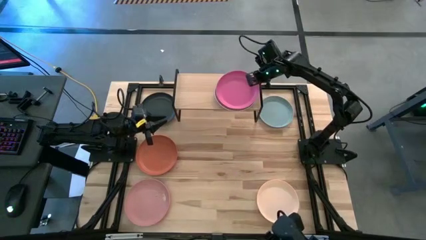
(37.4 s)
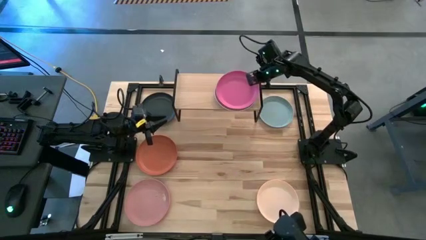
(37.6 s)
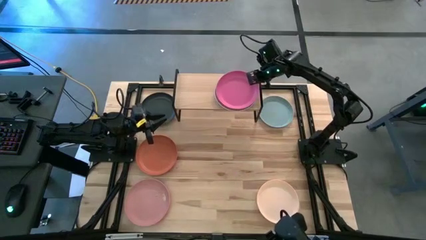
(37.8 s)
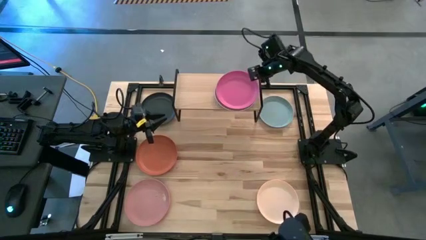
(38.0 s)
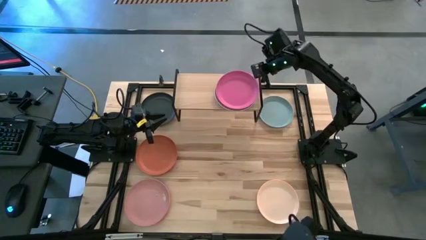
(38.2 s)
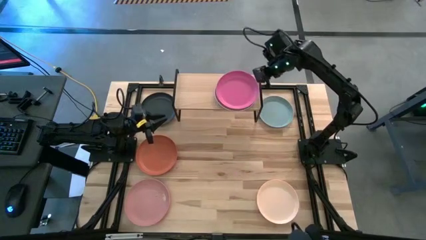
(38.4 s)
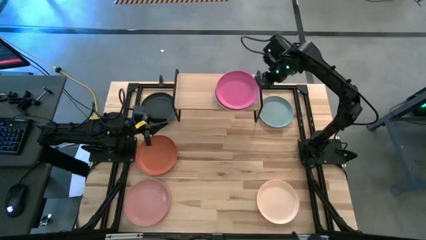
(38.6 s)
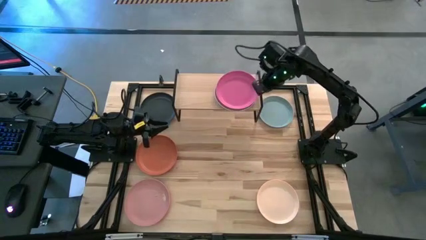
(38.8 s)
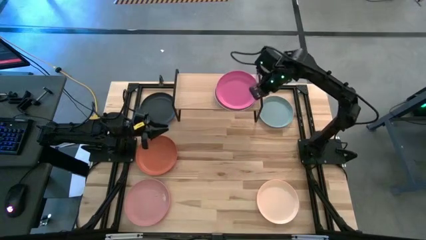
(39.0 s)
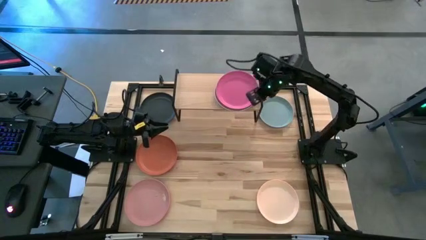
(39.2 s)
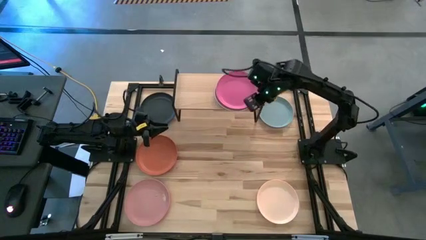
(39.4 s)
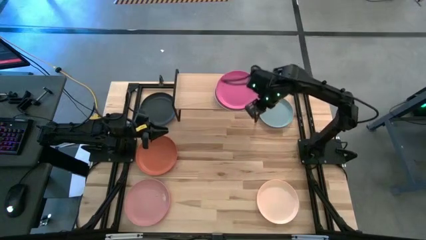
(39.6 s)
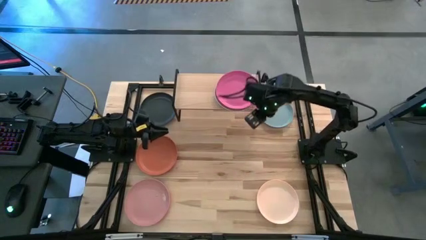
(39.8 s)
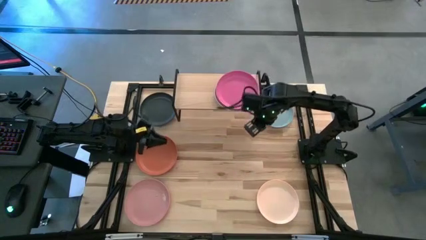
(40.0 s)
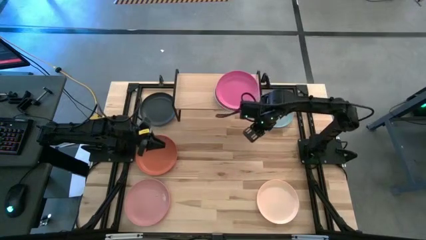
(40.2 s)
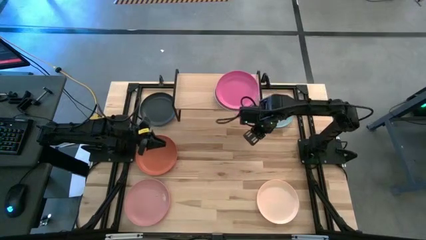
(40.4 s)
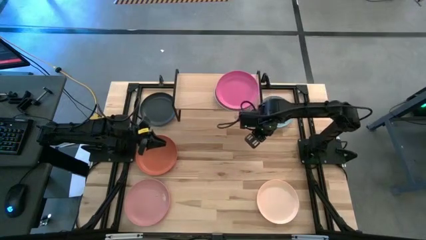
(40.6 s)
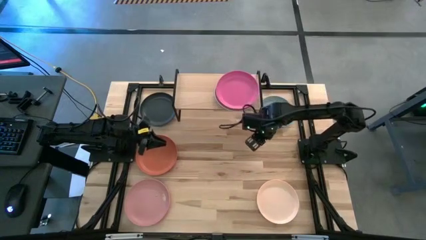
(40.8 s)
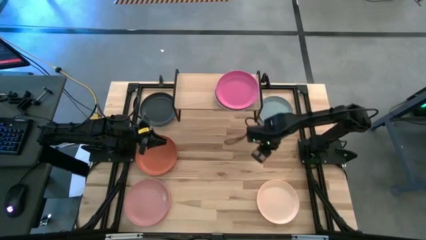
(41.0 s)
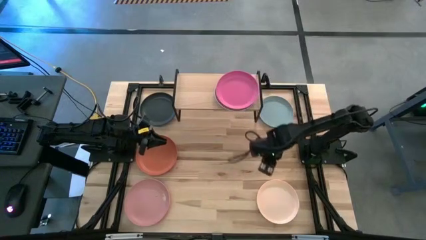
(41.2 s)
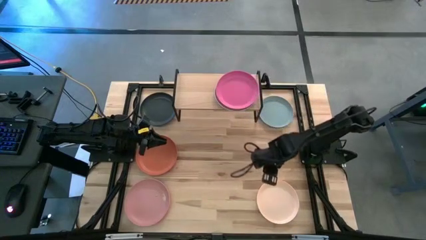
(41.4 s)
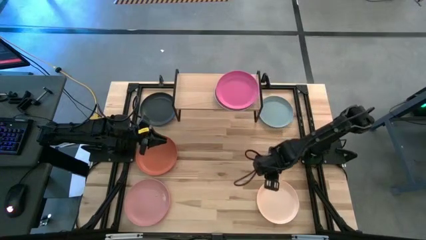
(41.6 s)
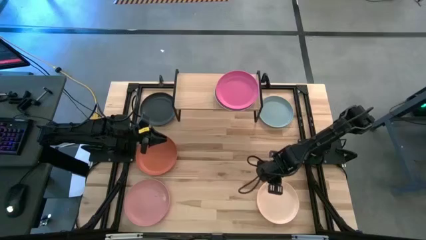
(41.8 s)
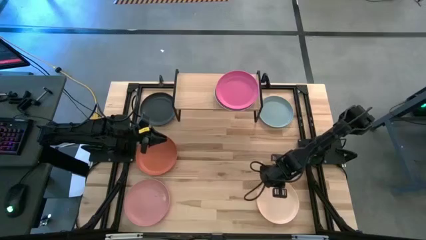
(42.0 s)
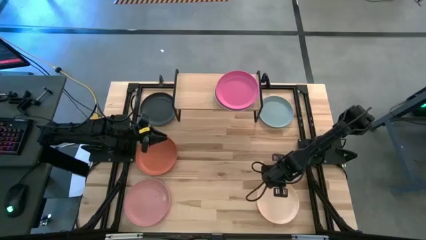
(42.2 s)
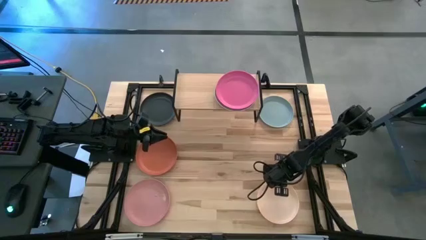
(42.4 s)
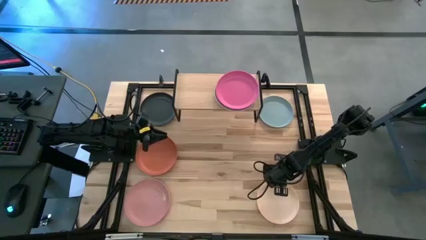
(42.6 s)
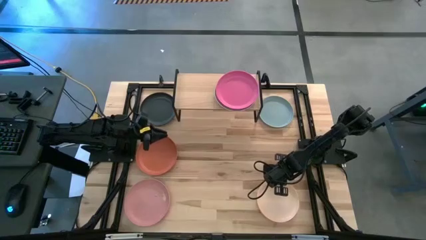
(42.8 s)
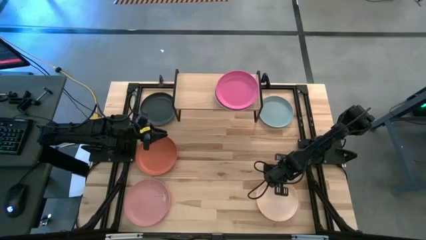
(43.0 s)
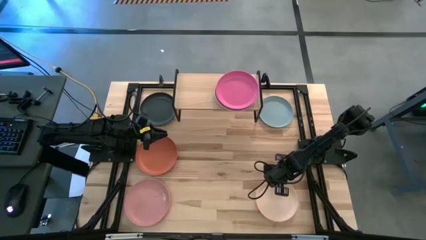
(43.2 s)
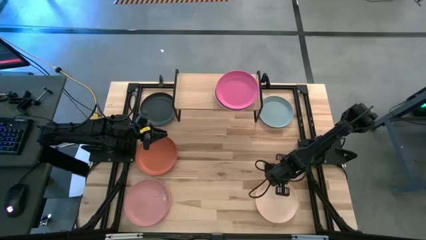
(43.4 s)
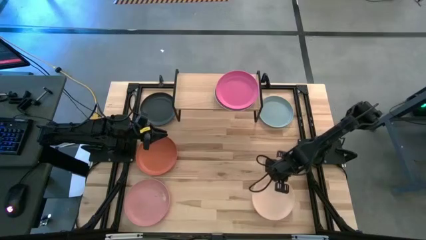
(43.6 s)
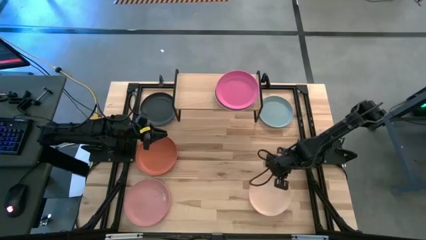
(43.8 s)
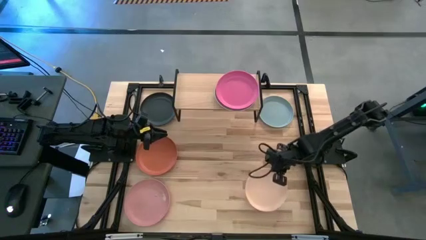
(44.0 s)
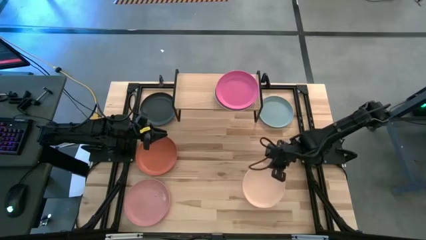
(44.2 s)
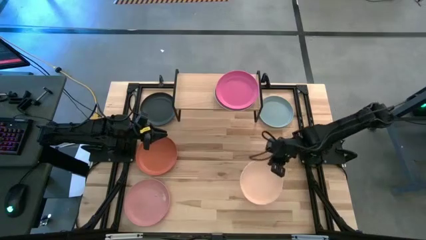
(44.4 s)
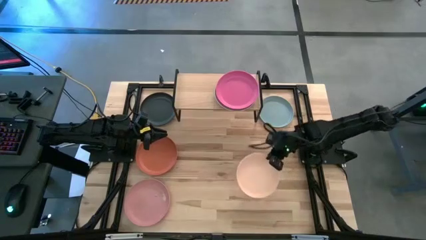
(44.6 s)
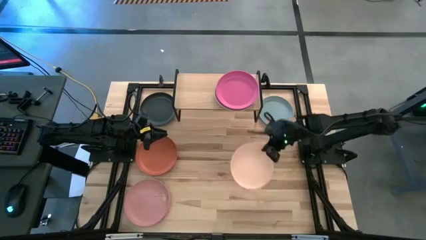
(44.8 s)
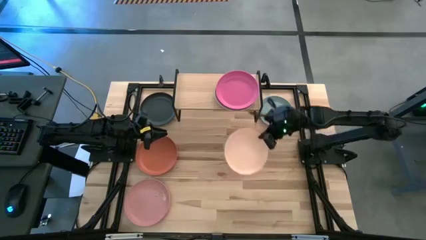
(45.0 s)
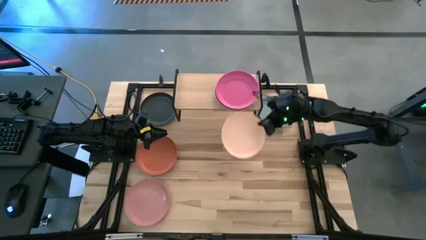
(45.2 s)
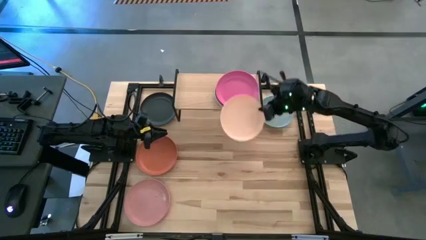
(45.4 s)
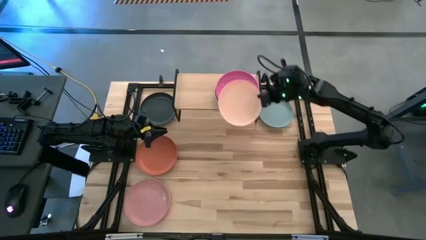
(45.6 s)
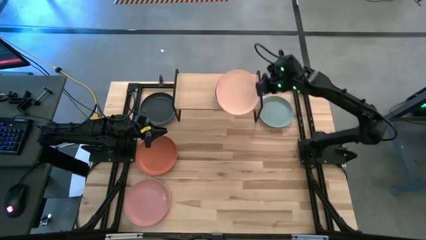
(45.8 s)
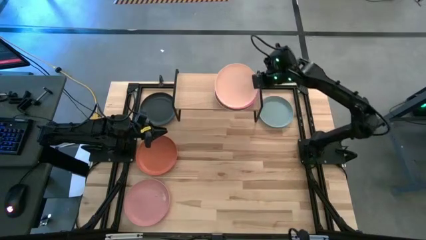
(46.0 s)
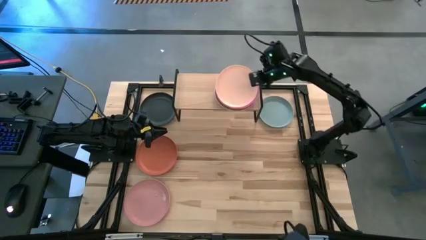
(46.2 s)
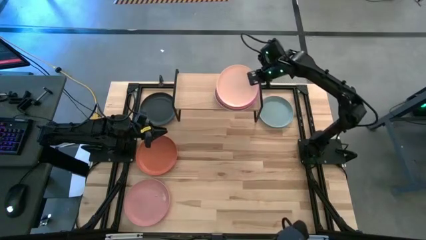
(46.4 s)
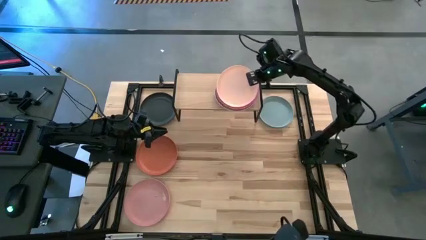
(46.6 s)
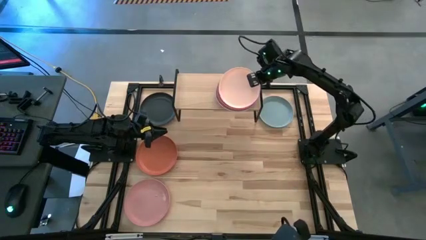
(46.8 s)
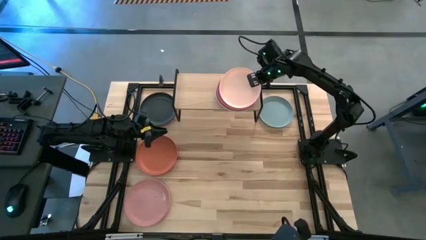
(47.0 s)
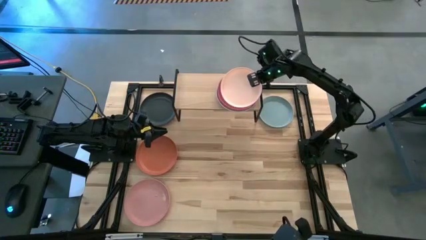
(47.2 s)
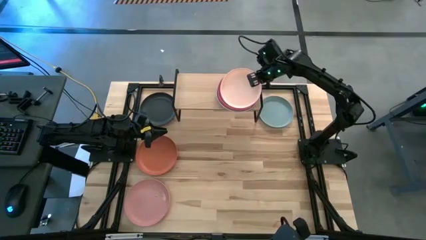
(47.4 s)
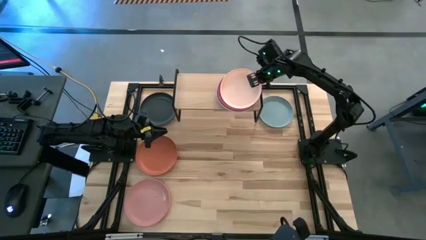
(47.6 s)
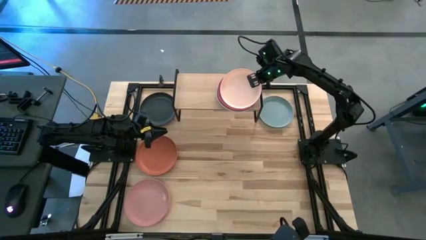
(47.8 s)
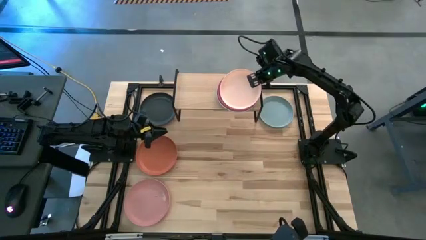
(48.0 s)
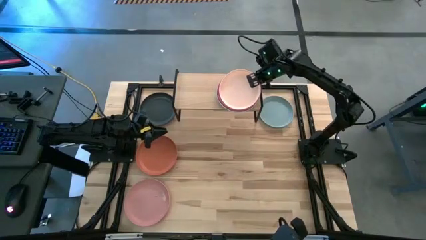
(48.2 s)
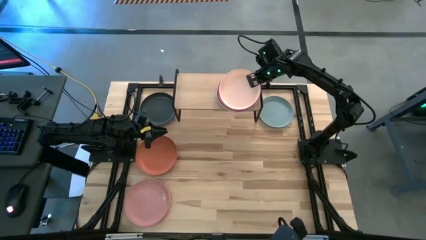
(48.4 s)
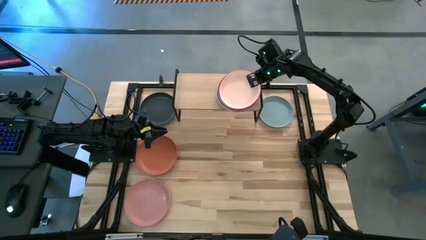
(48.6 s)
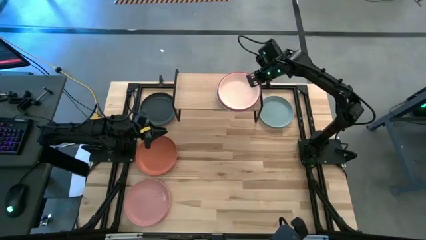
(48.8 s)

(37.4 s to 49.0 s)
Task: Place and stack plates onto a shelf
Stack the light orange plate on top of the pink plate on the shelf

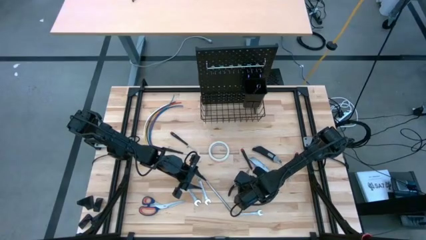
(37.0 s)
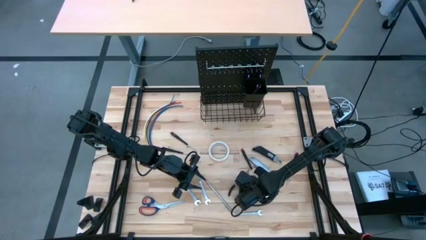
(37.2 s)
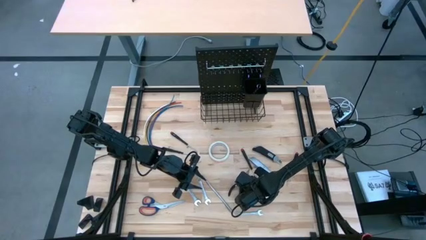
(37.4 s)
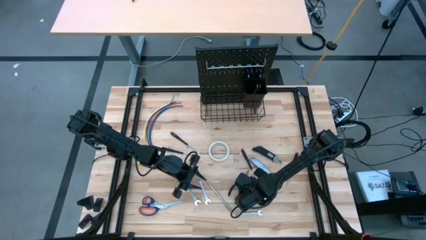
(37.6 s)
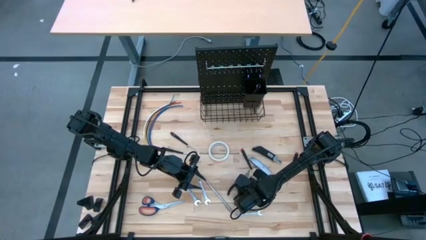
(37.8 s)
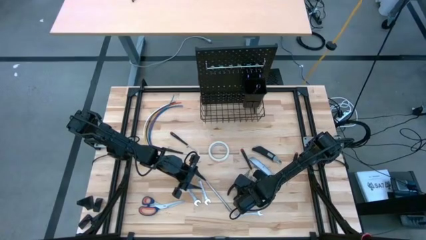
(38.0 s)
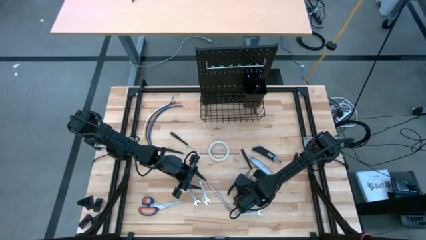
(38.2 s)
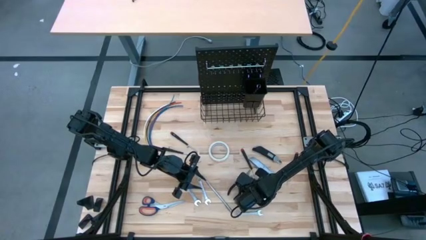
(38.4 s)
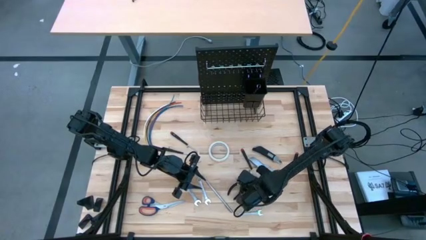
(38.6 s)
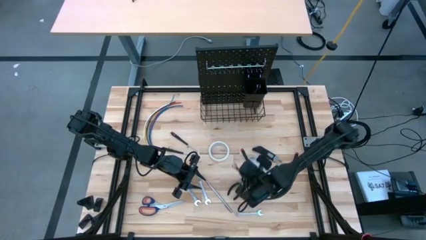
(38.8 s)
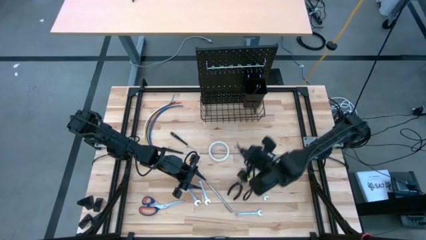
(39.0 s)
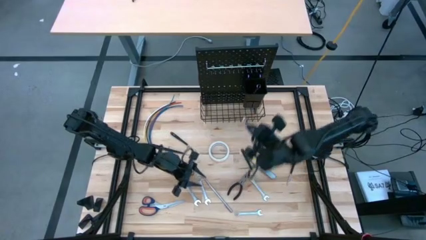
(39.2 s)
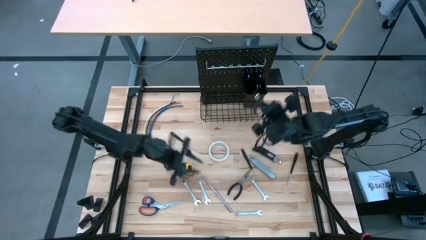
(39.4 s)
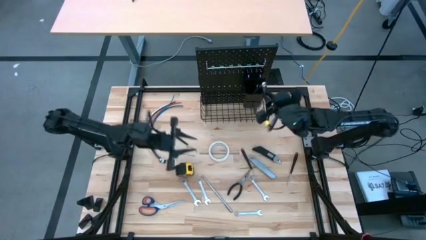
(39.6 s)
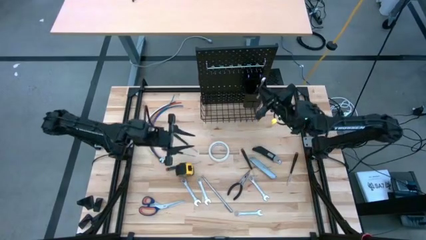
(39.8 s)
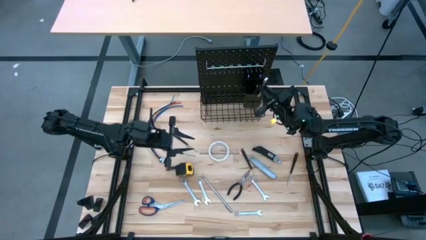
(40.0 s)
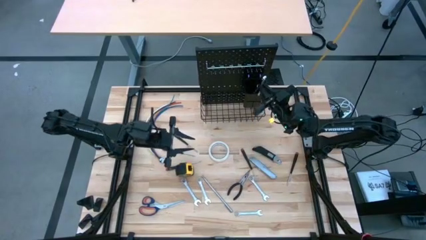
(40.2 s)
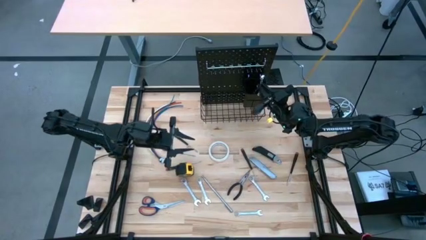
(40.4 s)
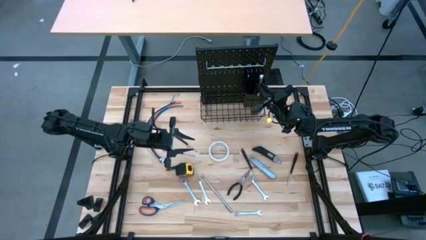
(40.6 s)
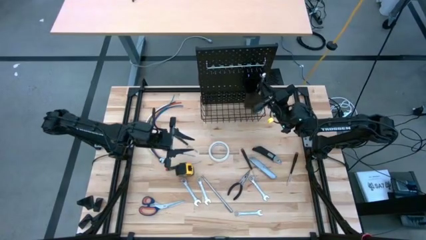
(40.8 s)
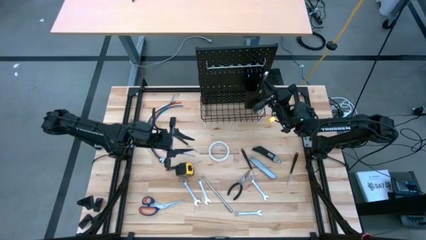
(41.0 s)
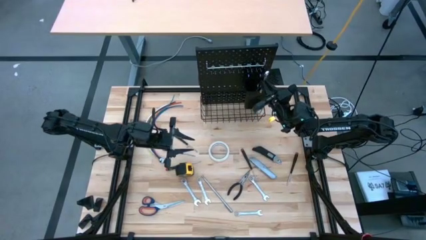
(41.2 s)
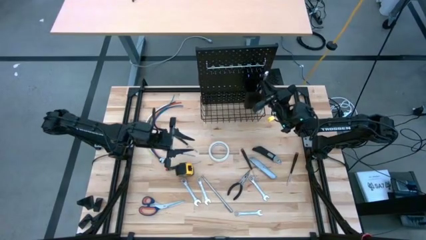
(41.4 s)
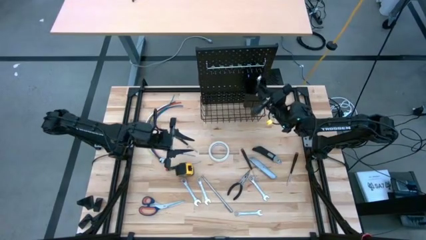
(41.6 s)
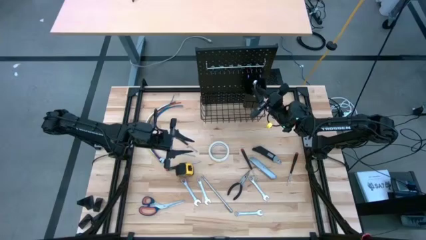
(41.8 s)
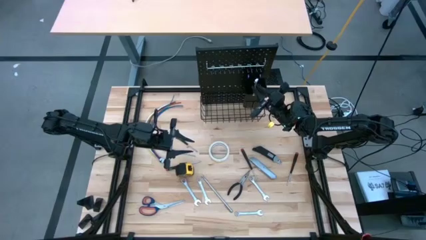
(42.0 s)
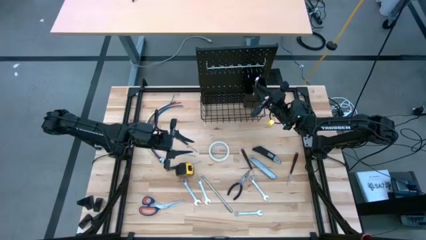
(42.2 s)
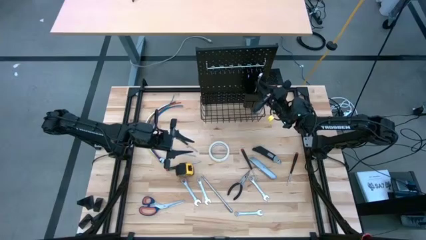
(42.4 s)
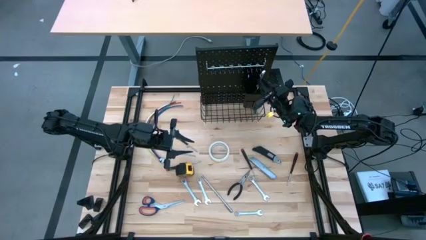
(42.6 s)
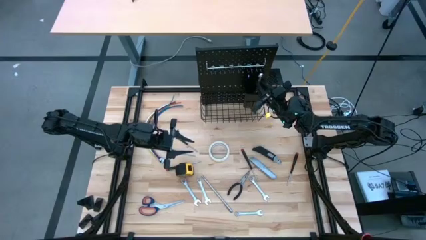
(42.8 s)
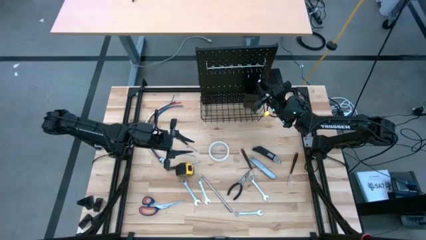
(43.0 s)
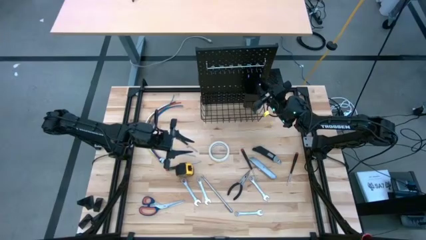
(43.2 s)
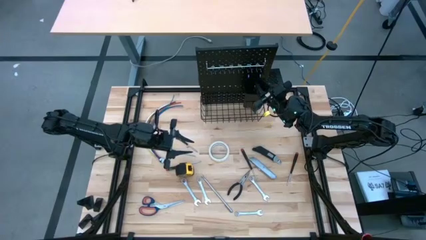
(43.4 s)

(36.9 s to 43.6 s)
Task: Hang tools onto peg board
Put the wrench into the black bin on the peg board

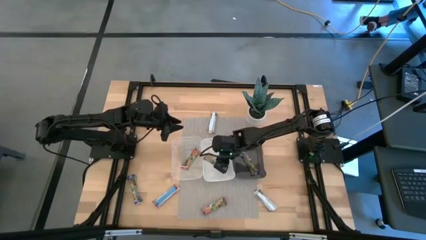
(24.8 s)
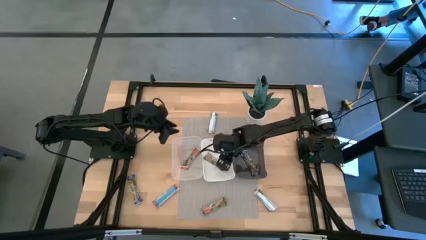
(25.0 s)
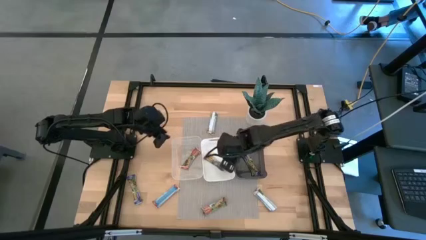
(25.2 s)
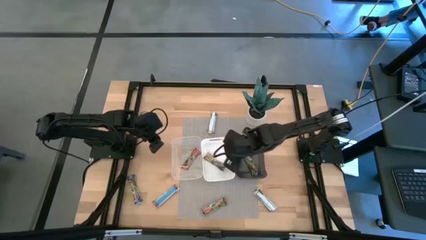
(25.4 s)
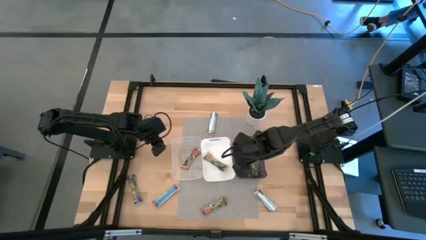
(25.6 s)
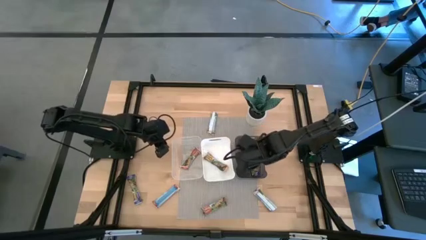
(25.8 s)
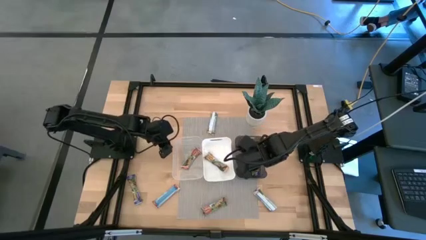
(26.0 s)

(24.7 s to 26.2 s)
Task: Pick and place Granola Bars by type
Adjust the transparent bin
